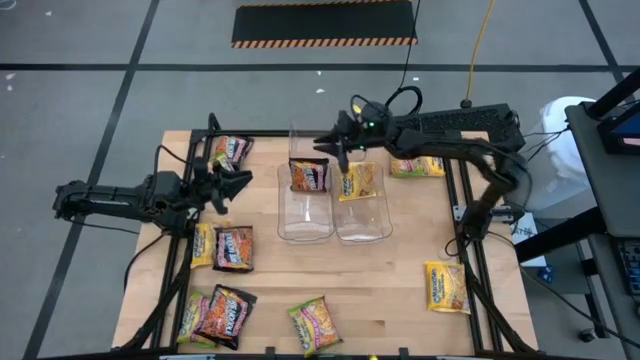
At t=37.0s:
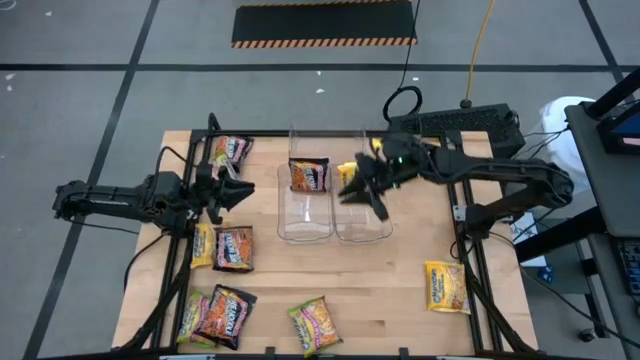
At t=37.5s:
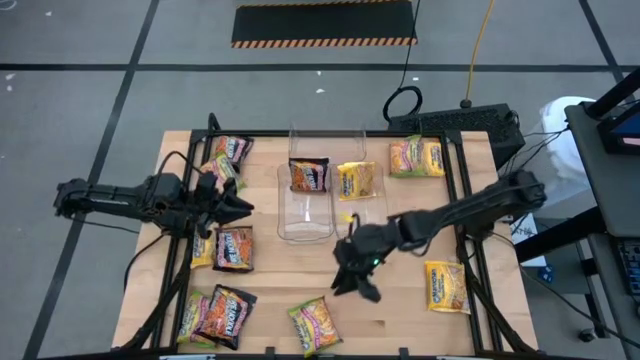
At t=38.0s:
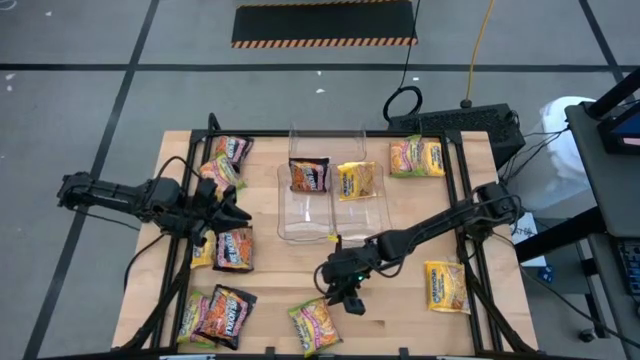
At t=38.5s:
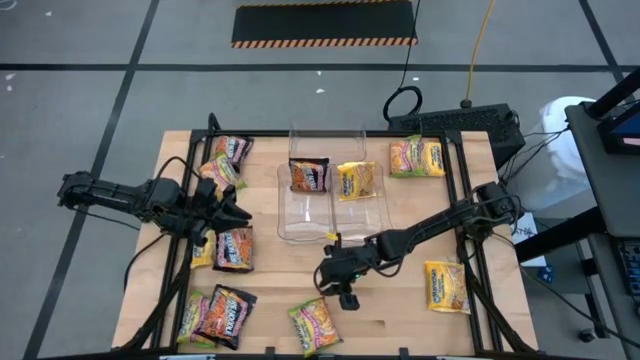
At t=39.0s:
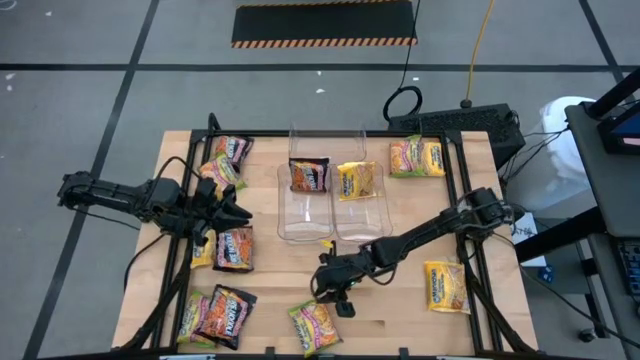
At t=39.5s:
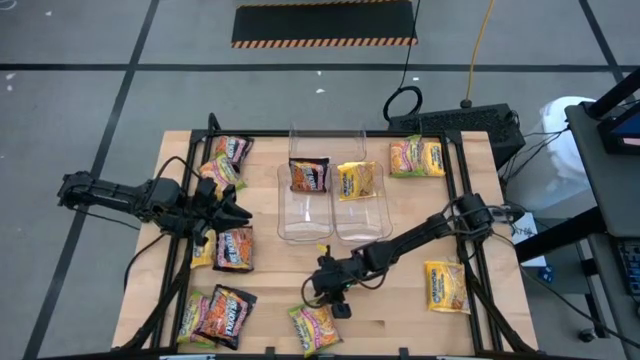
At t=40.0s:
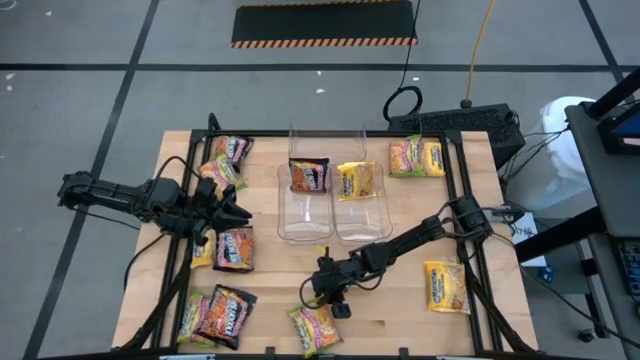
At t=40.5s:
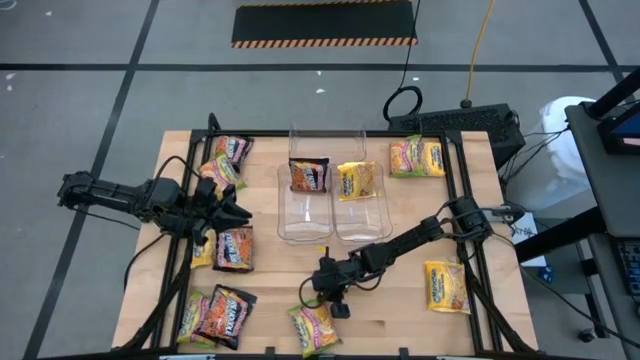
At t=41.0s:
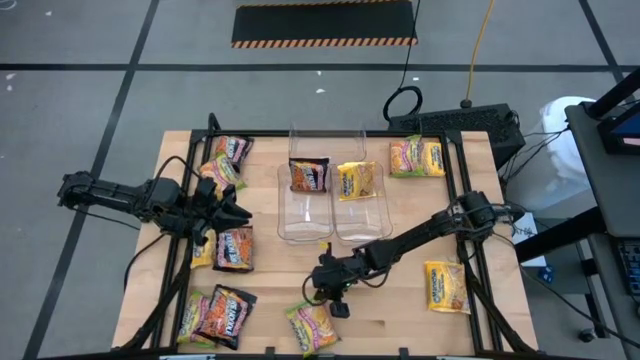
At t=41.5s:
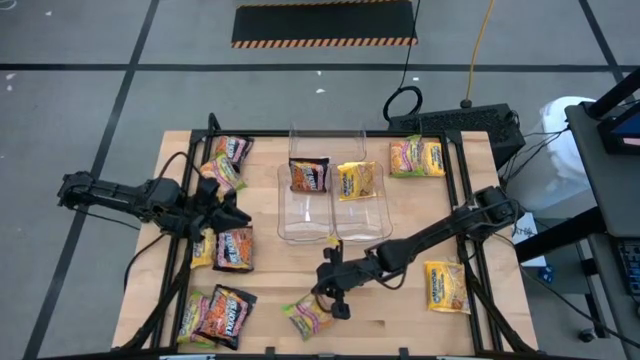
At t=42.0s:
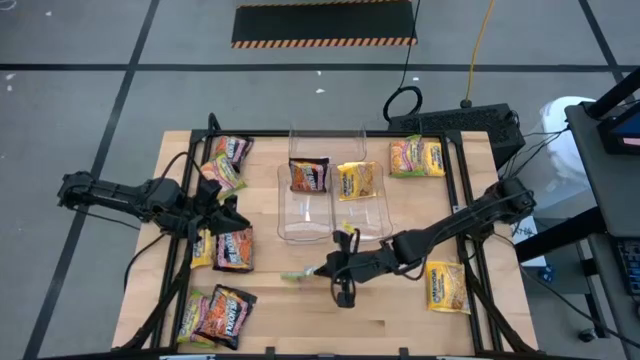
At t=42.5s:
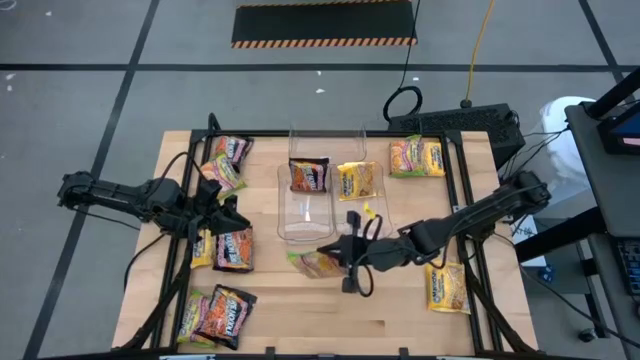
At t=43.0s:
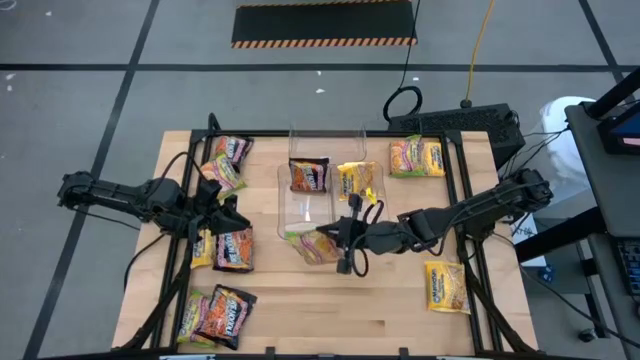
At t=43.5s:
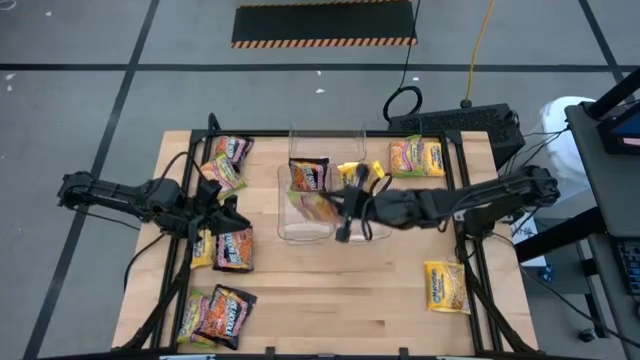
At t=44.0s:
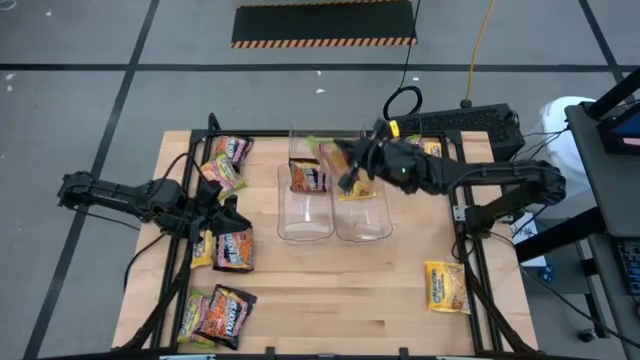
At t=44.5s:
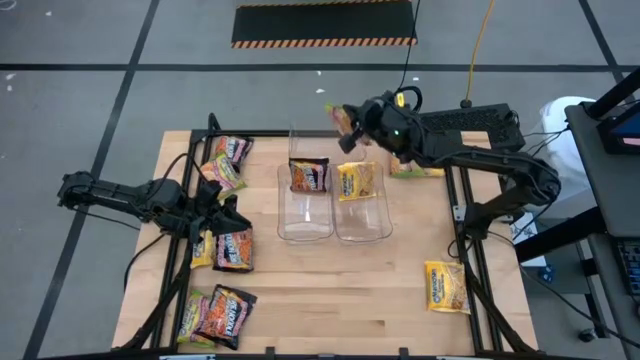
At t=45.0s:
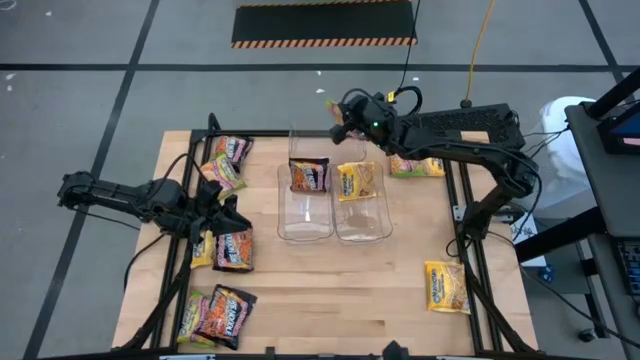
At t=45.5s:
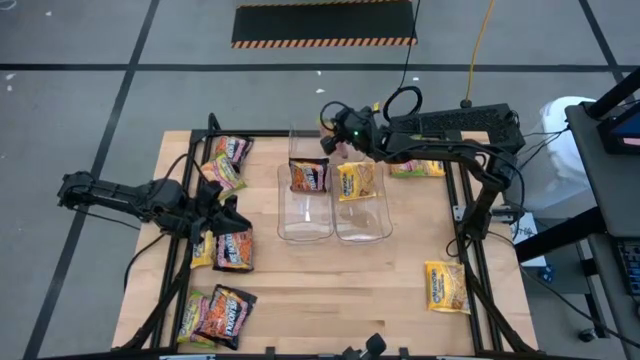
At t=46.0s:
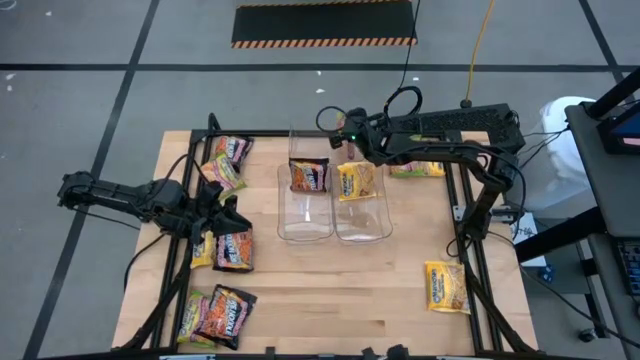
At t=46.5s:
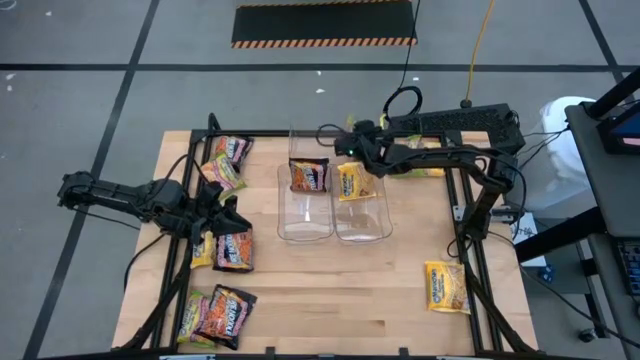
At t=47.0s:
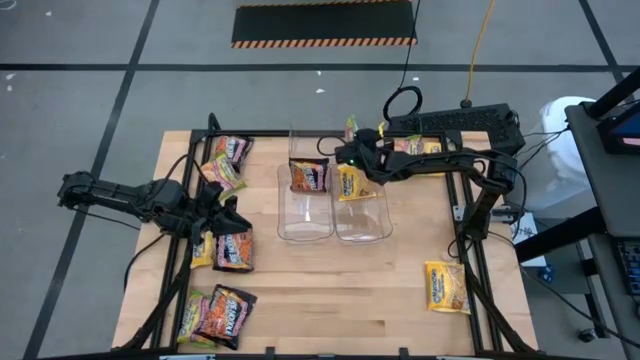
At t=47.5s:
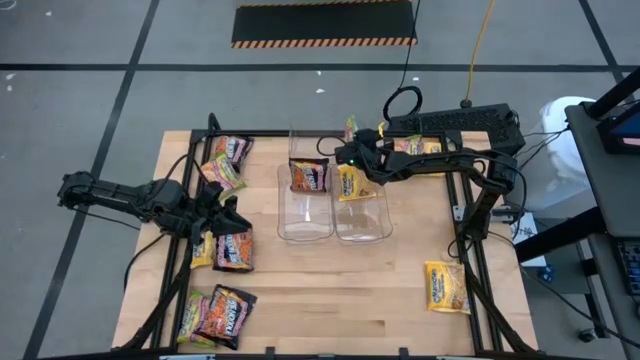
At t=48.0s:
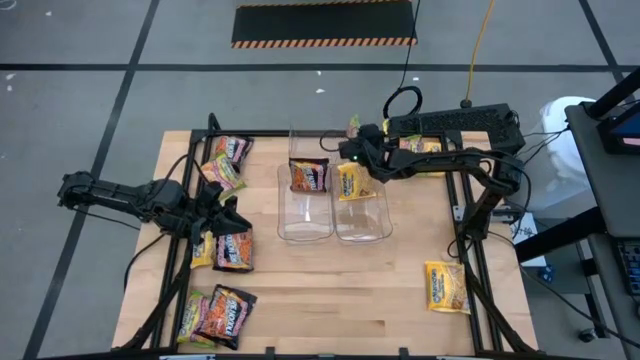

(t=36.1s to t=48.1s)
Task: Sort Maruchan noodles
Put the green noodle pack into the top transparent bin

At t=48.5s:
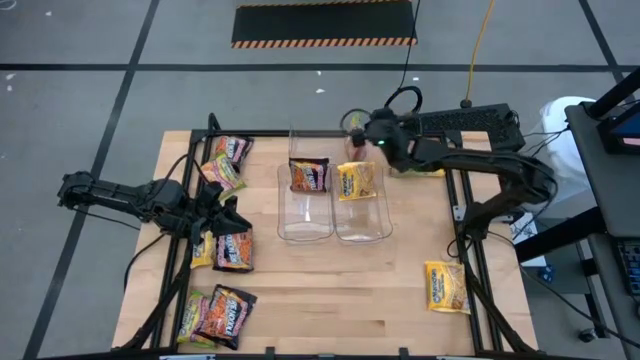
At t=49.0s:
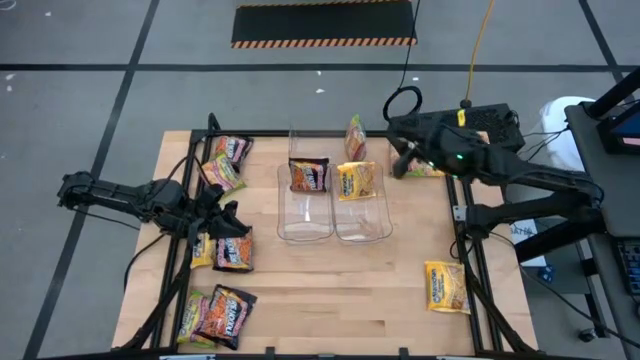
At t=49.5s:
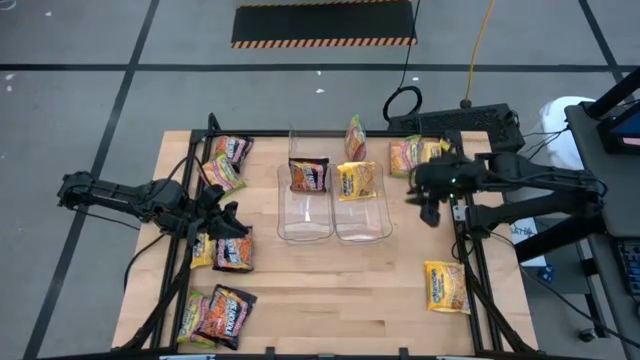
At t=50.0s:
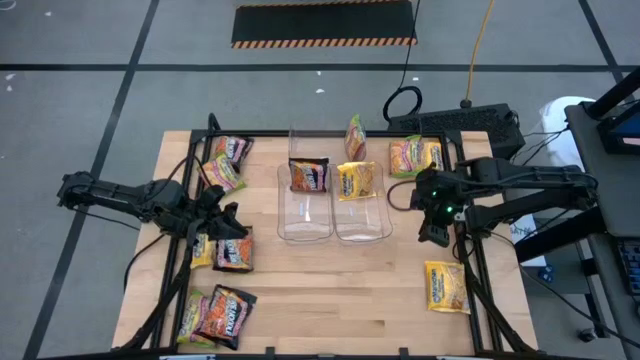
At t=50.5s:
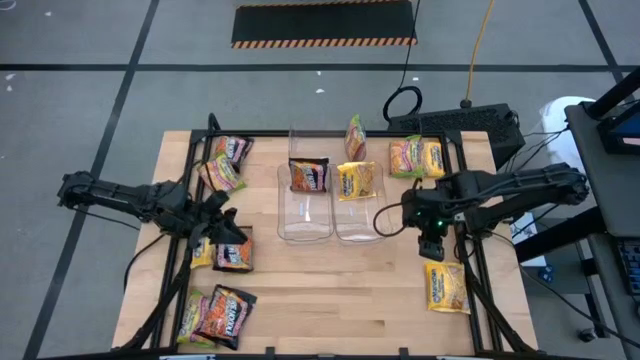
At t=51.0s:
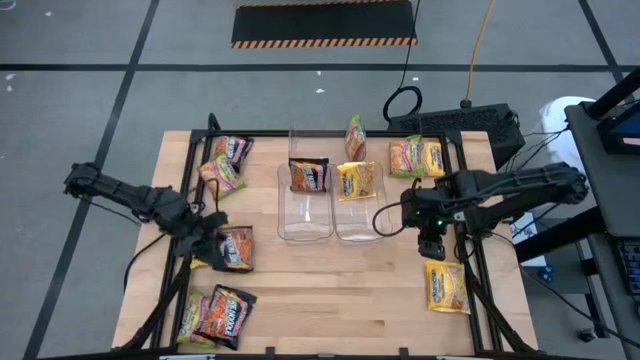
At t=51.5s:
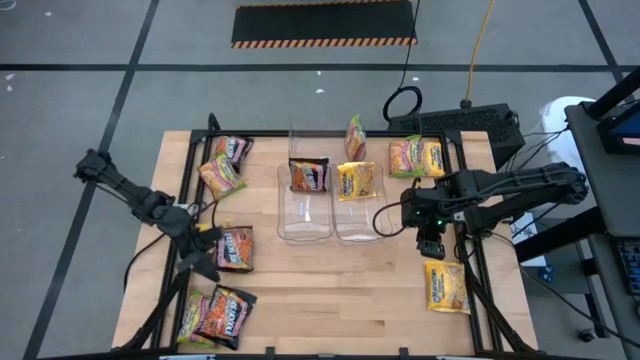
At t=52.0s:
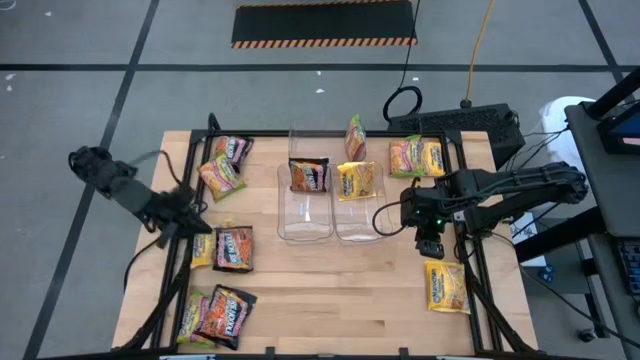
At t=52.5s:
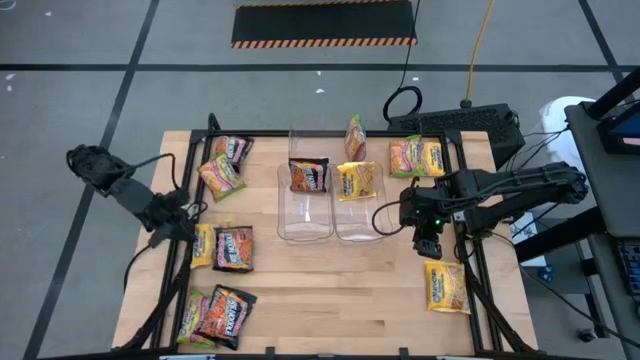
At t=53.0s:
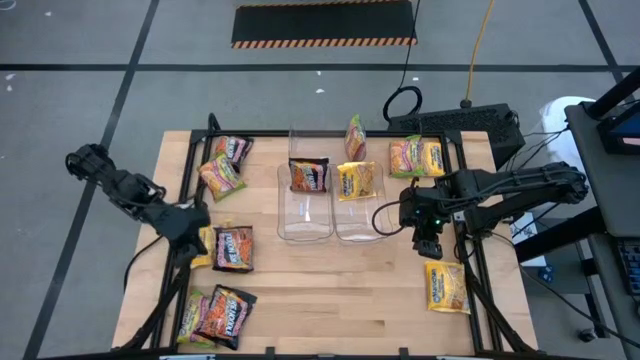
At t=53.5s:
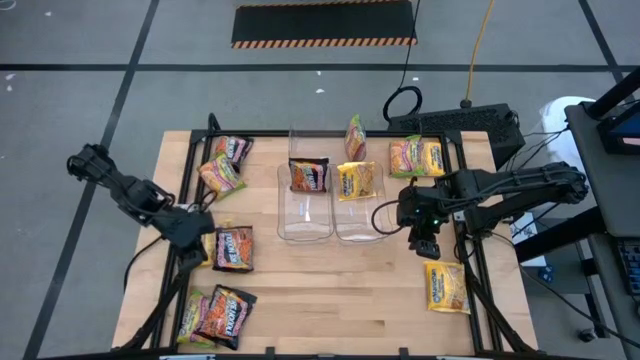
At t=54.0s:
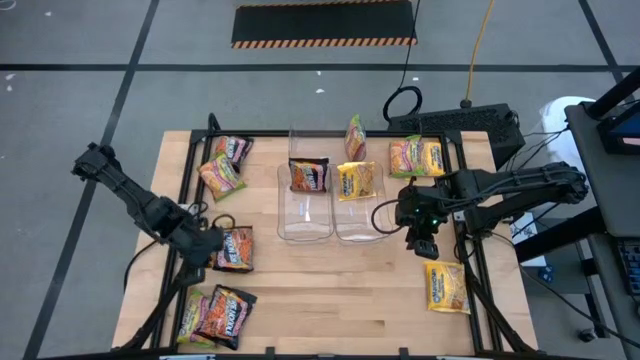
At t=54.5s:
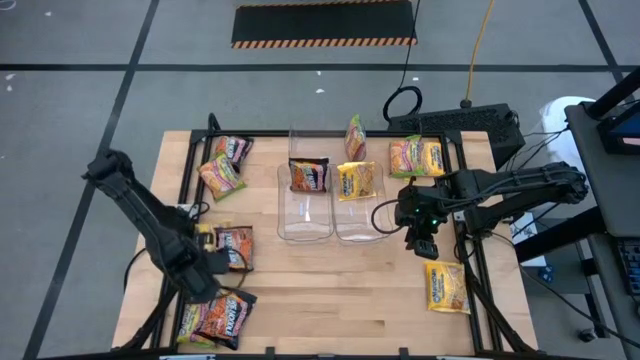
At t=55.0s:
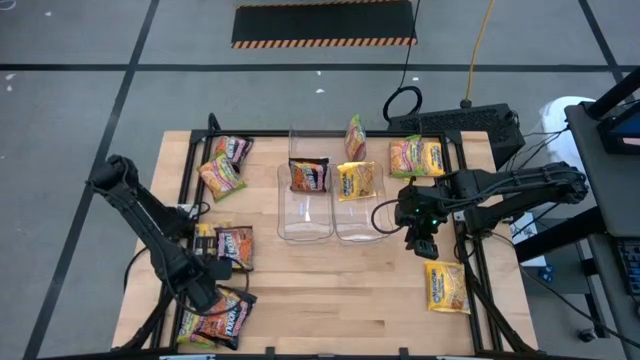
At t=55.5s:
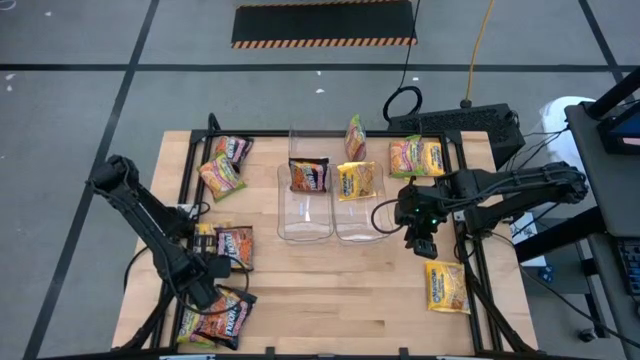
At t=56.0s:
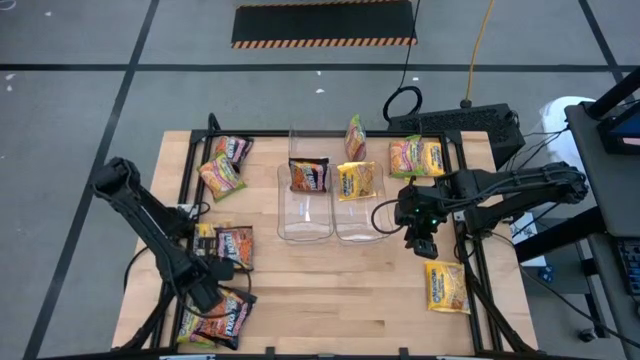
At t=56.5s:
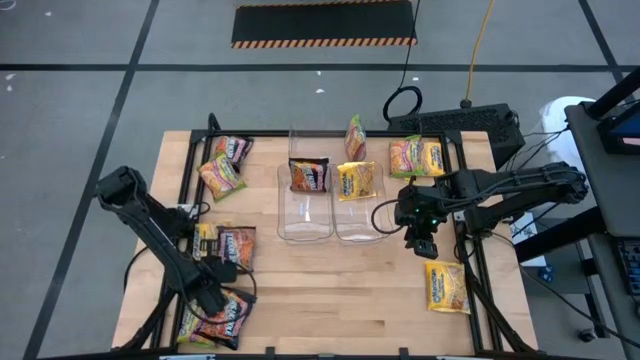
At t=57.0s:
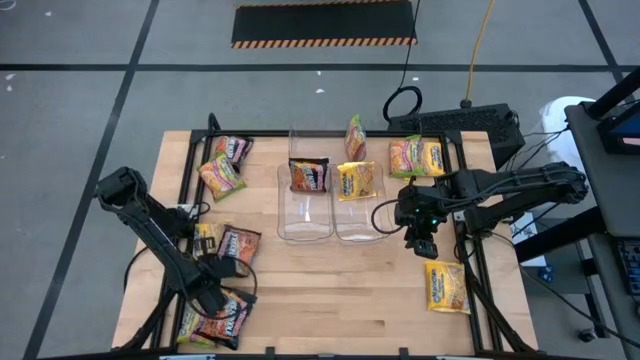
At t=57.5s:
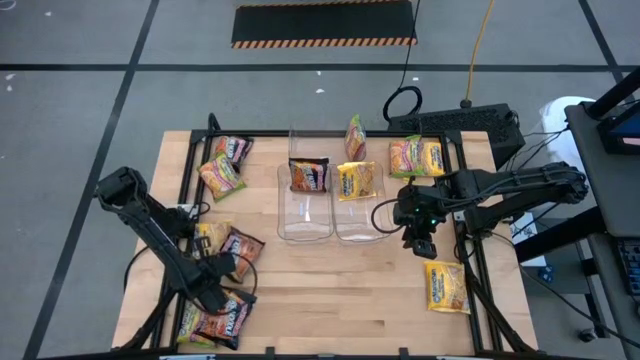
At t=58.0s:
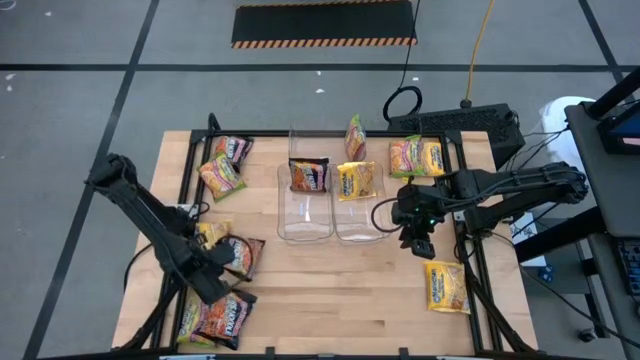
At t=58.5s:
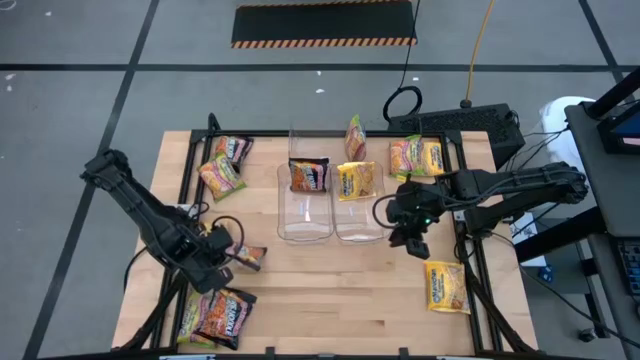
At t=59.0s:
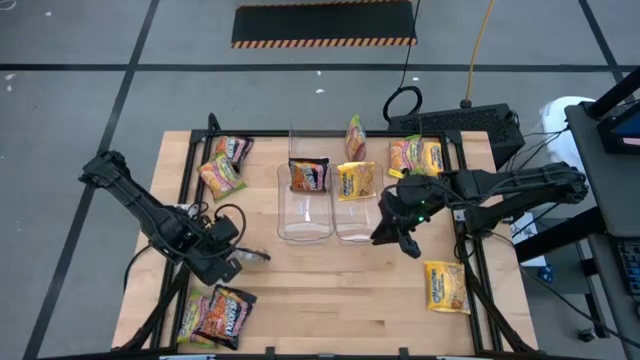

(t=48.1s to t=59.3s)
Put the black noodle pack into the left transparent bin
